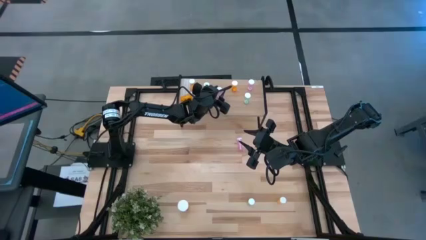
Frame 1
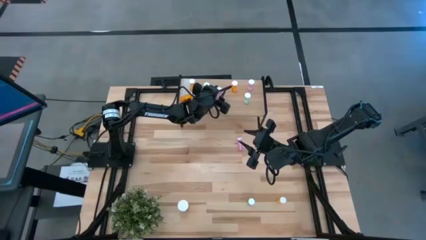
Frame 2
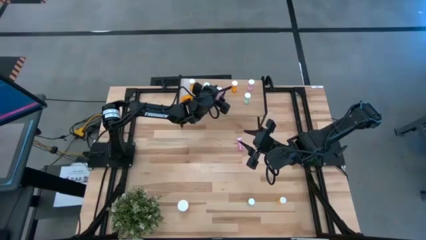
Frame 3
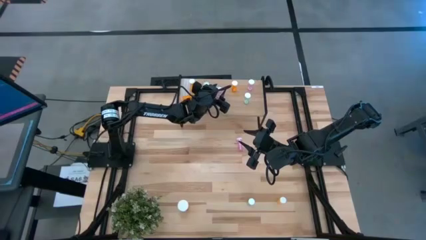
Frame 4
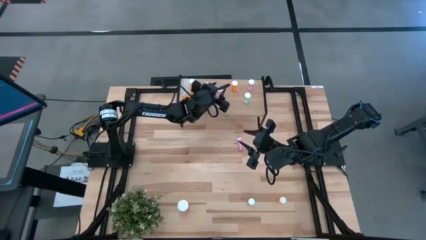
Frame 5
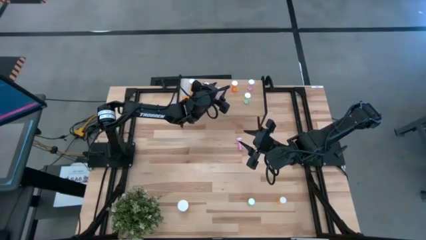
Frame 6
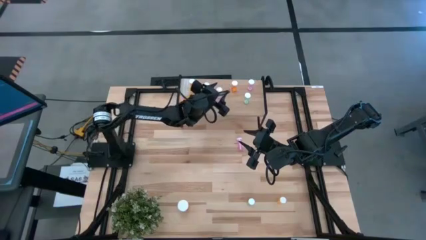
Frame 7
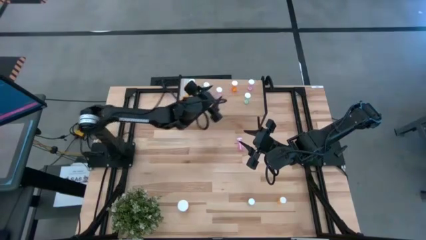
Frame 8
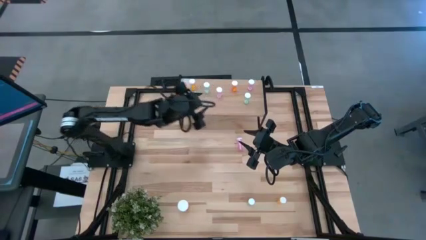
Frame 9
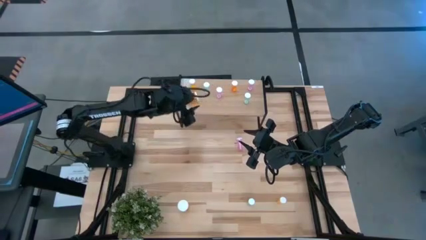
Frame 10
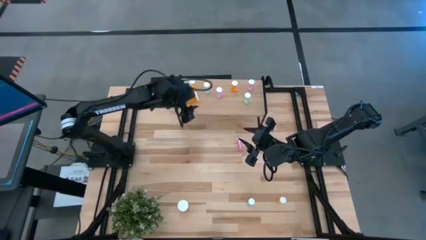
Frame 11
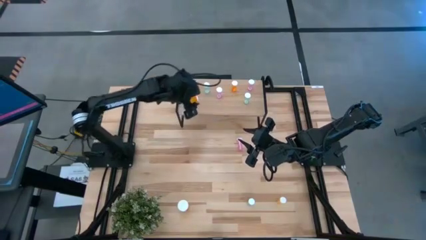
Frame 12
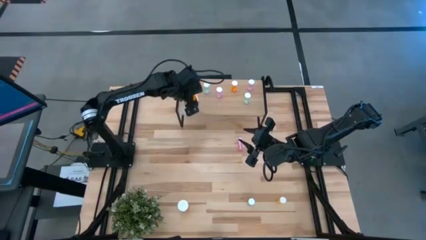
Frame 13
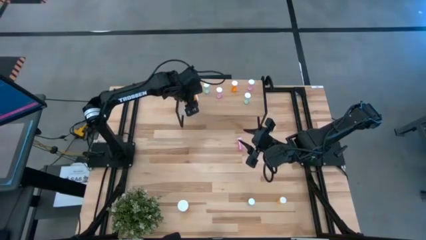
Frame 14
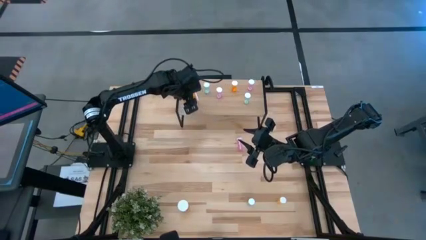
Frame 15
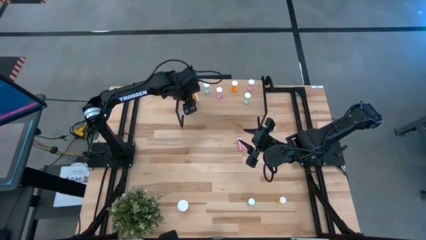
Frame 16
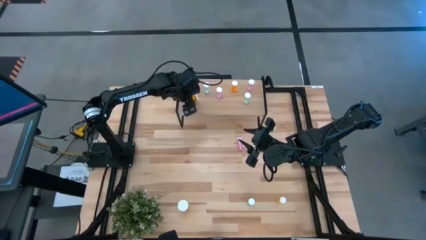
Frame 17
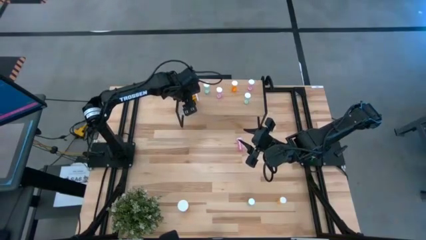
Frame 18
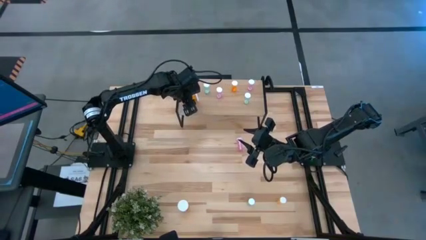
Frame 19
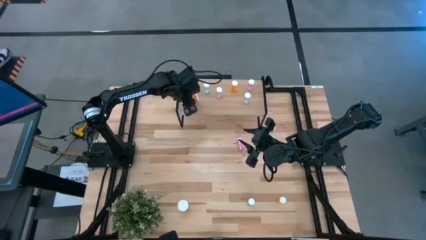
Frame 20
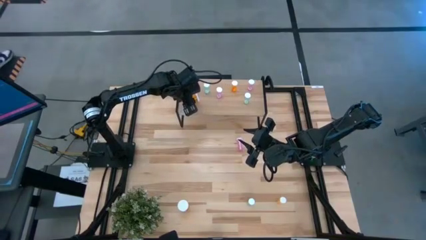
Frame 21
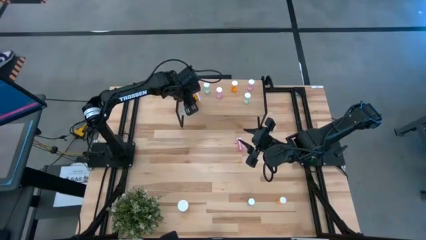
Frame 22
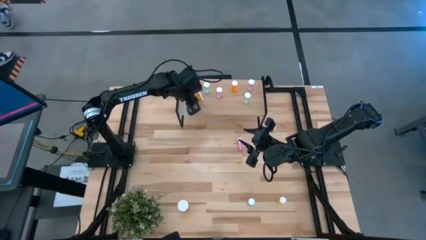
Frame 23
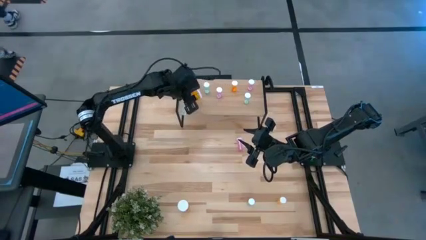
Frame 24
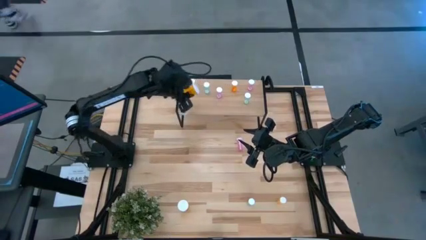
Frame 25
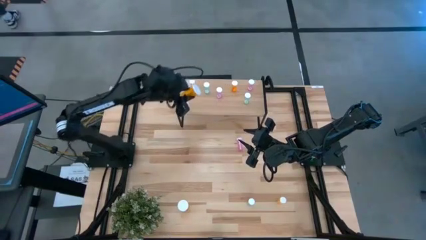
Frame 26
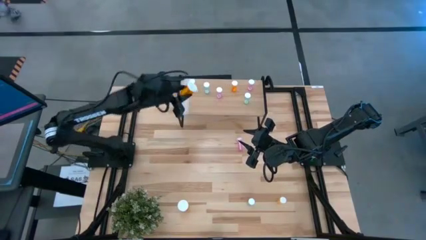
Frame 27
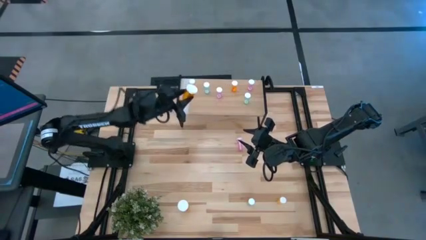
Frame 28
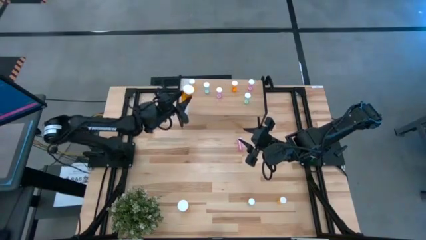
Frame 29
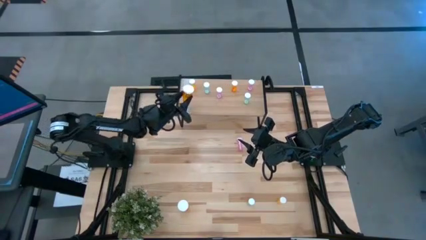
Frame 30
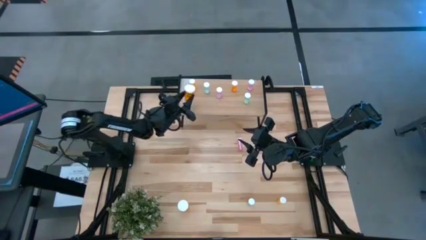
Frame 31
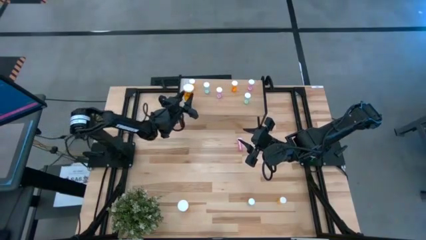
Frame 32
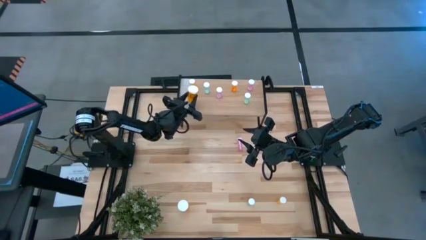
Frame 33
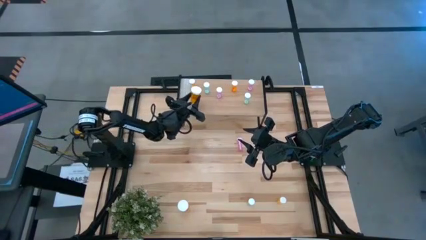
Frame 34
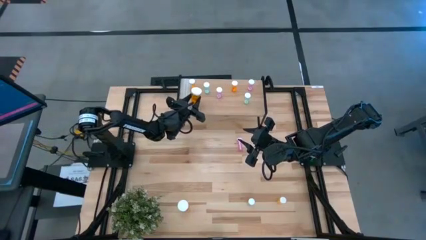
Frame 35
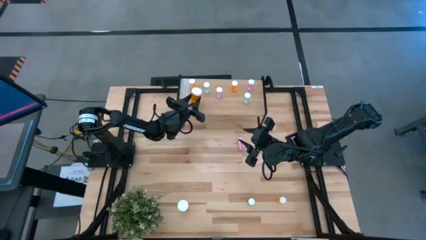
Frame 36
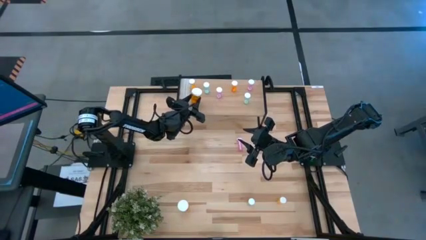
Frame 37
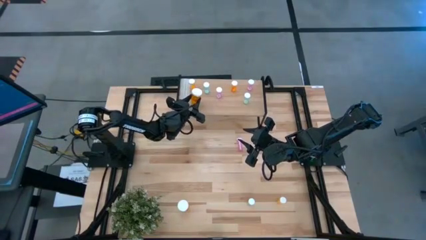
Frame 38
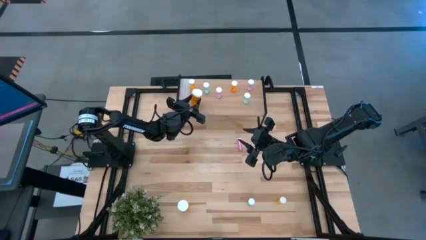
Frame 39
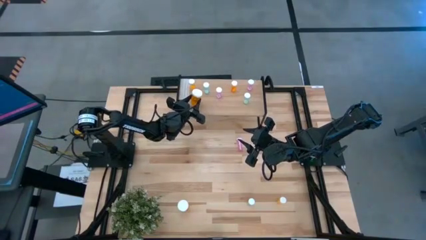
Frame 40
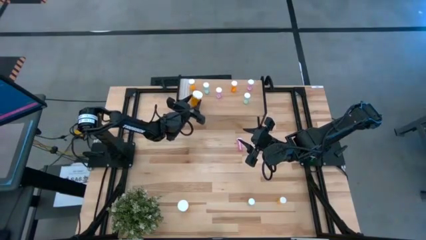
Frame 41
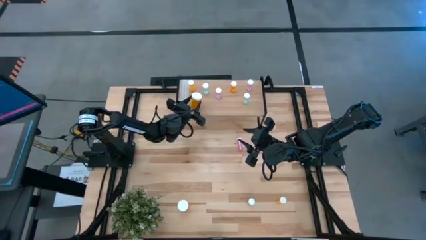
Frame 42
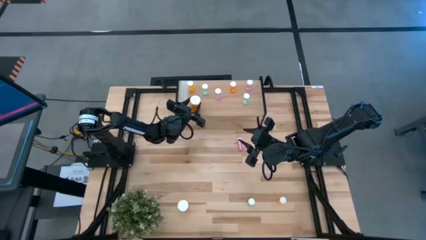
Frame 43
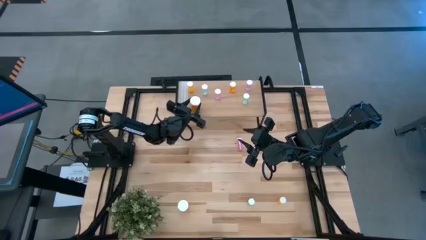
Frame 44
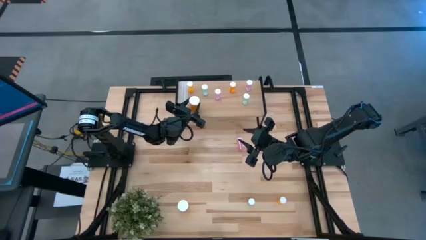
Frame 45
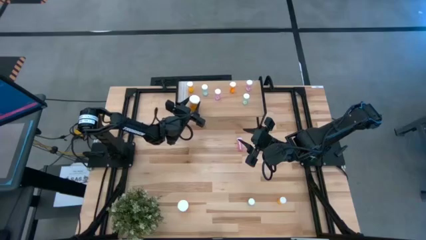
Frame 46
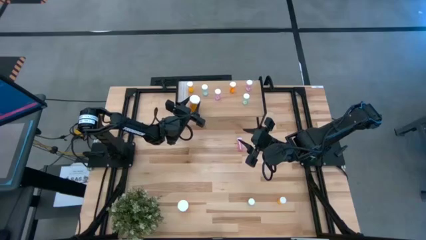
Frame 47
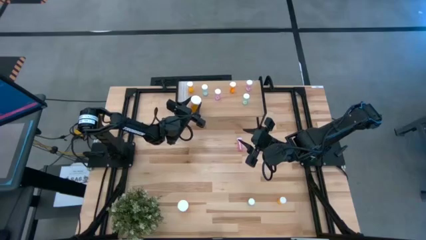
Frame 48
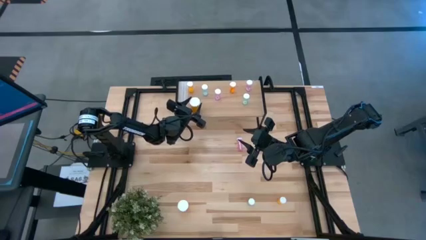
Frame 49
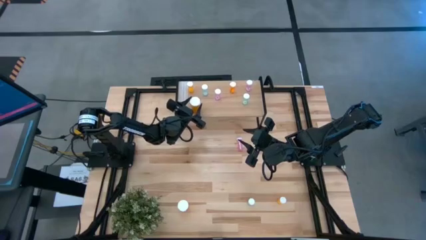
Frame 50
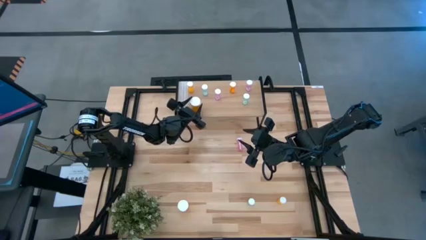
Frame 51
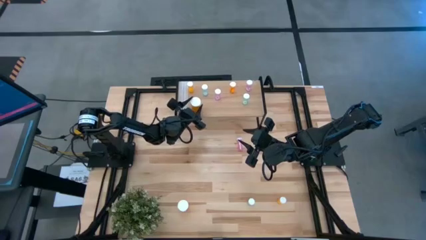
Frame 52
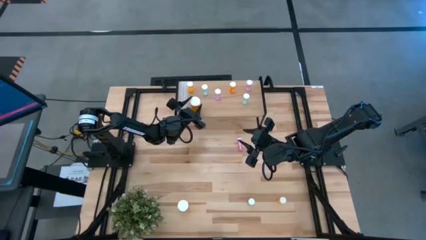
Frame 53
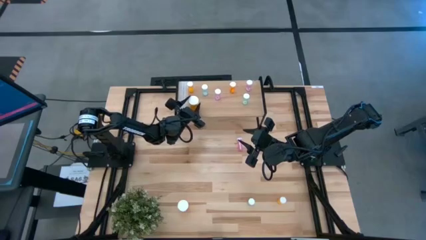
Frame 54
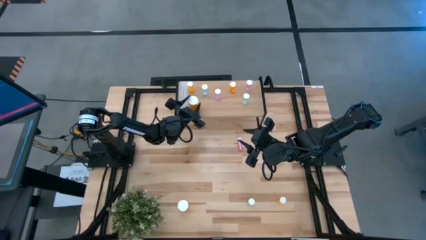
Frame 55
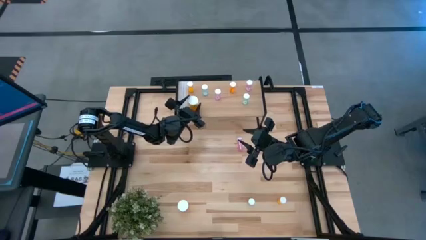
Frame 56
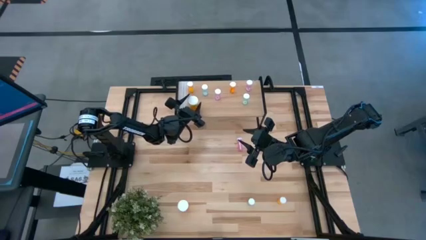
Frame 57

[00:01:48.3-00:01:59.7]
Task: Pick and place medicine bottles onto shelf by color
Adjust the big orange pill bottle on the shelf

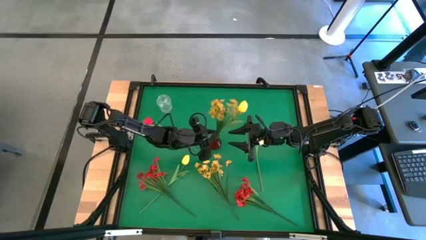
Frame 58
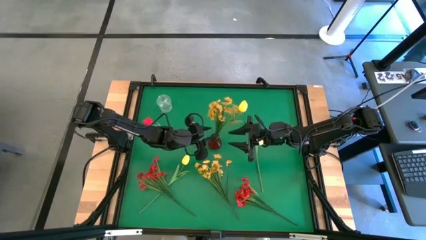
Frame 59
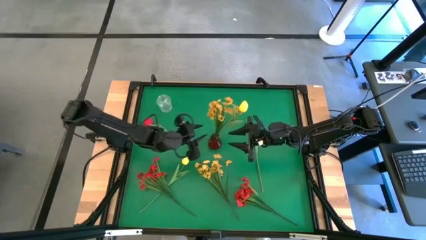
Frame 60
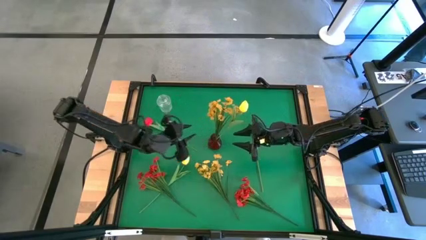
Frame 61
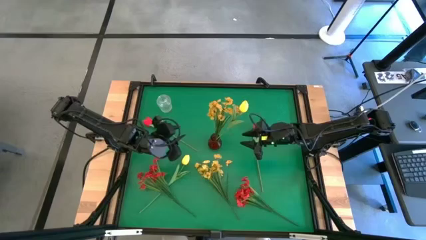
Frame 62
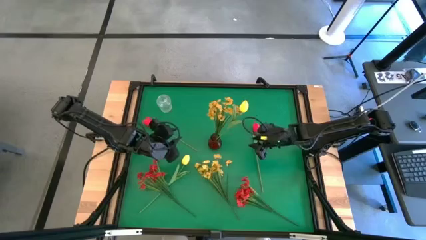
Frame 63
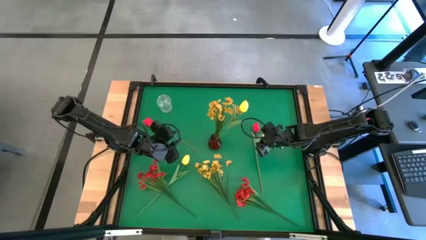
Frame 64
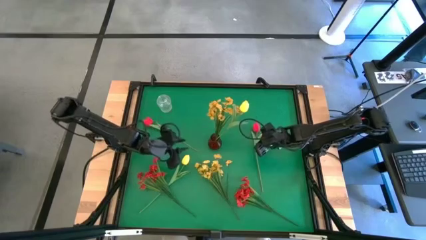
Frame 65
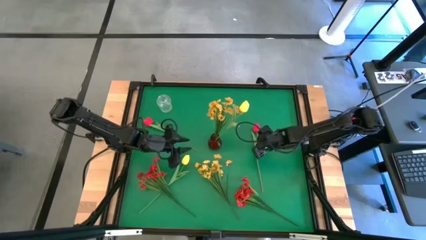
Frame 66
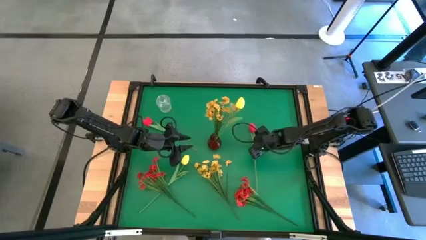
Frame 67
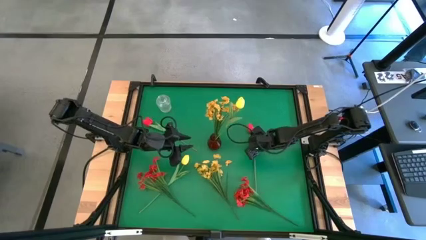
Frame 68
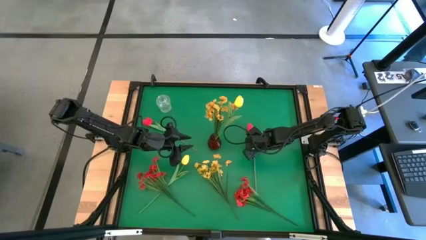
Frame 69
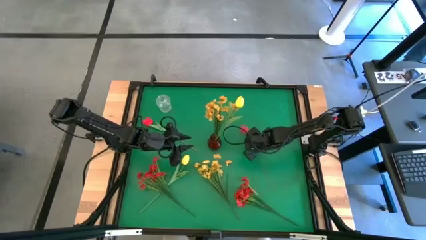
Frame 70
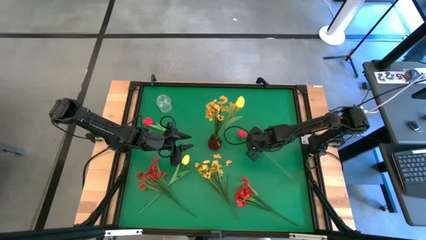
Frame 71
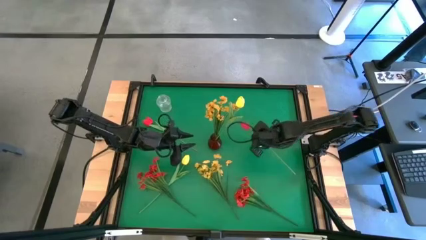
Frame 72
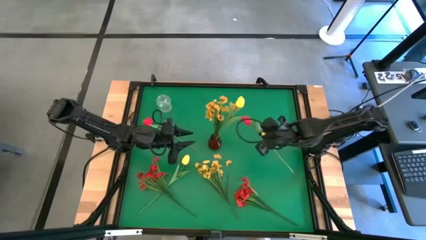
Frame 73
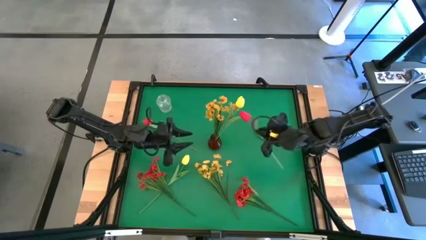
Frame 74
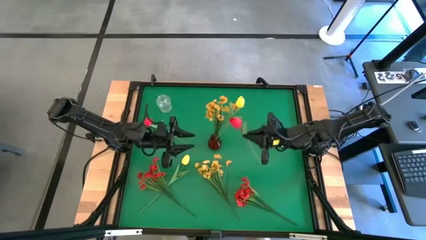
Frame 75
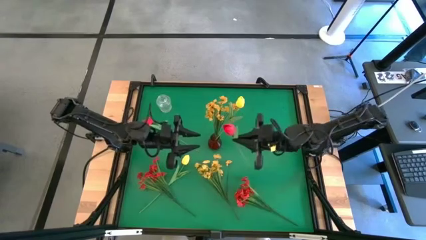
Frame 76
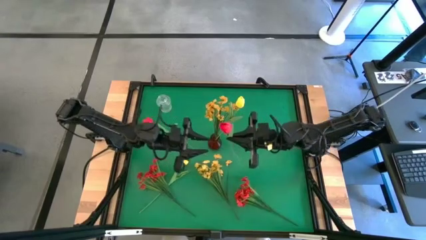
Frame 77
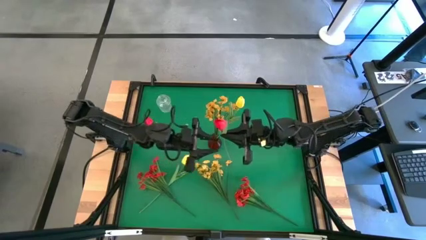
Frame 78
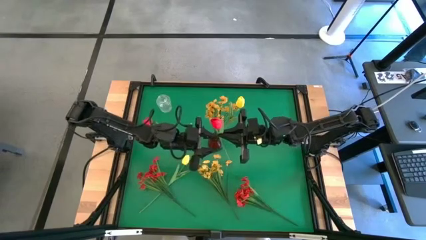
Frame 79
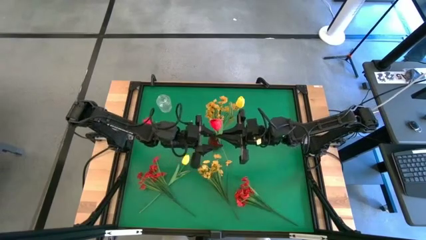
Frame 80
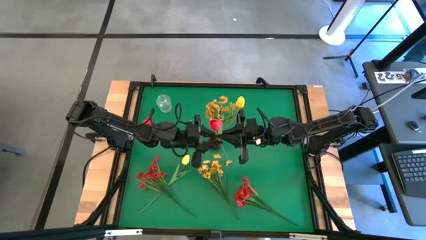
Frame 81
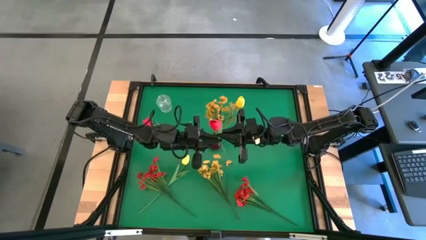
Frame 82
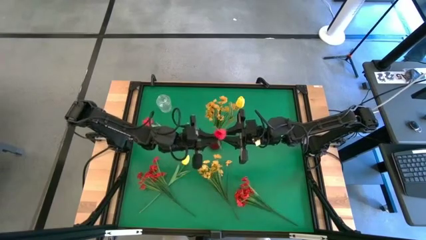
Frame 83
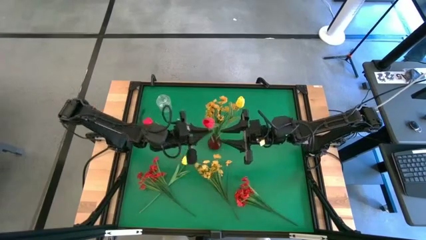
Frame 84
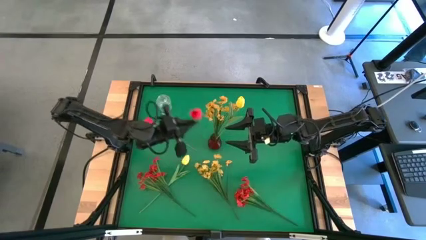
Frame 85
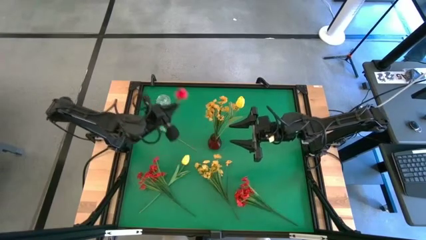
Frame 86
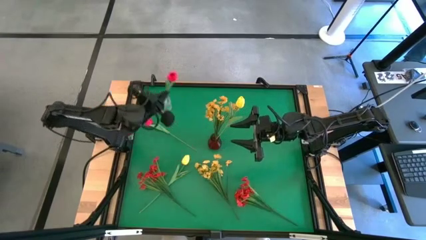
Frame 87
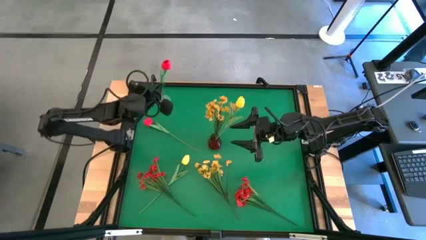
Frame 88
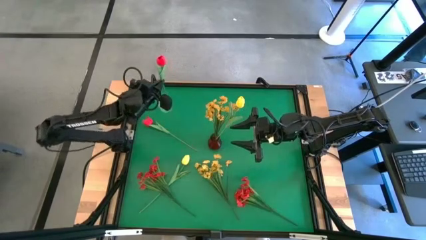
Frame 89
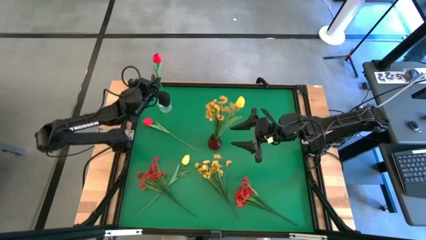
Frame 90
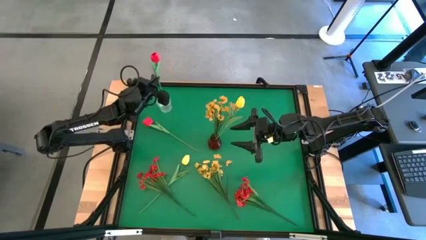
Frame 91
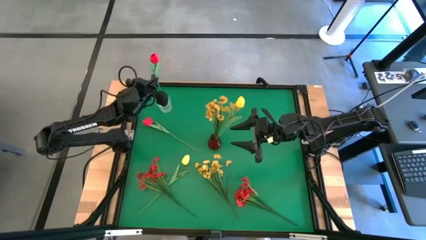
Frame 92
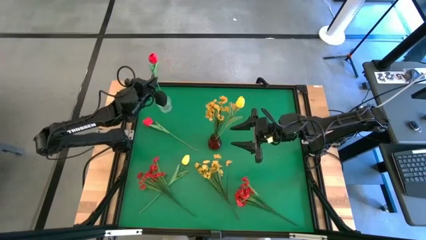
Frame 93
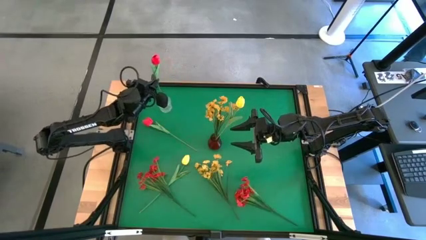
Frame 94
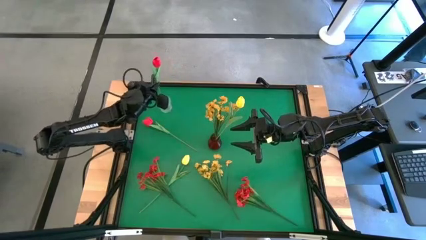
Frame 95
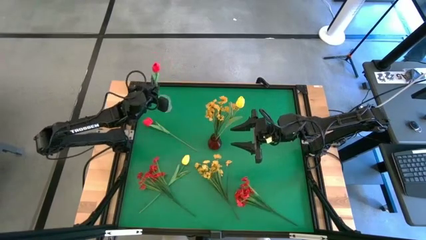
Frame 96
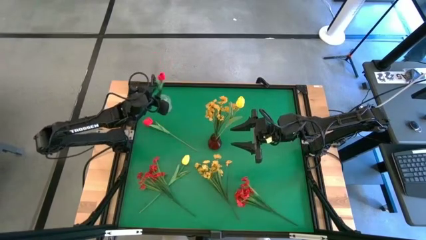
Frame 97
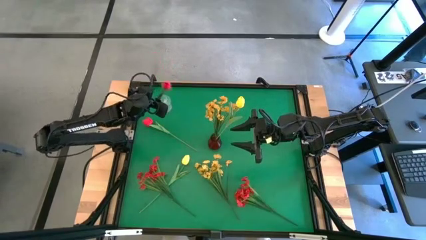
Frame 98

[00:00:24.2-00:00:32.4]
Task: Sort flowers into vase by color
Put the right red flower into the transparent vase
